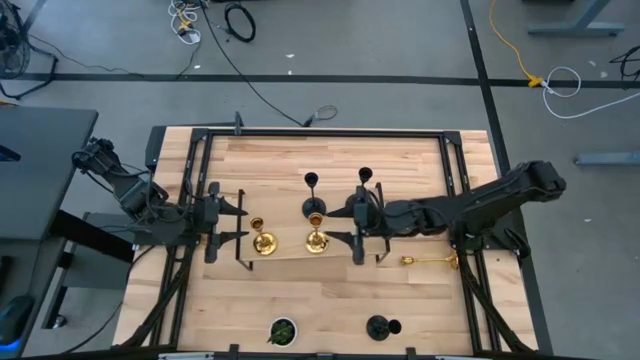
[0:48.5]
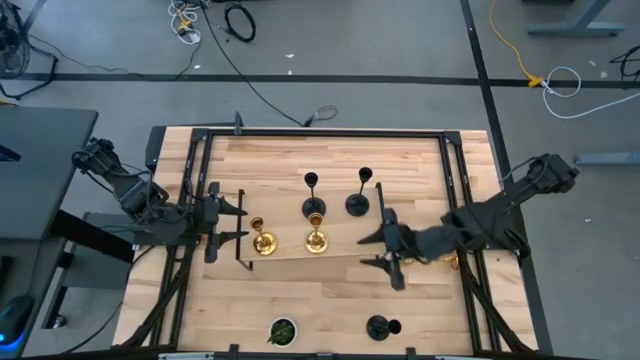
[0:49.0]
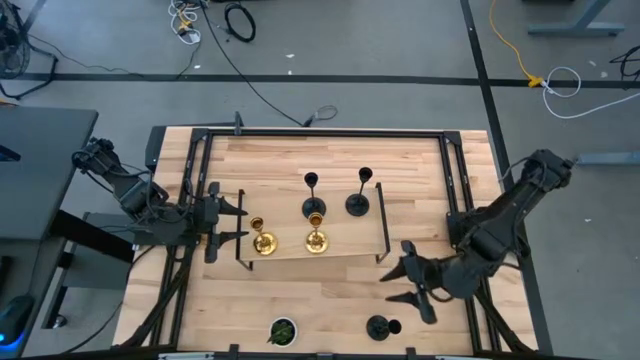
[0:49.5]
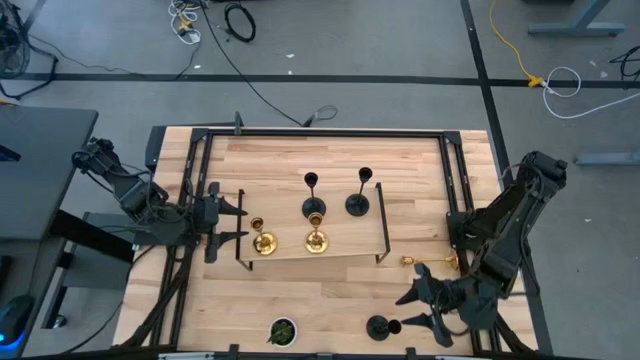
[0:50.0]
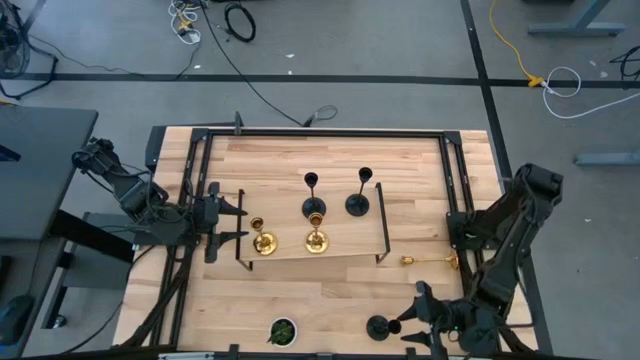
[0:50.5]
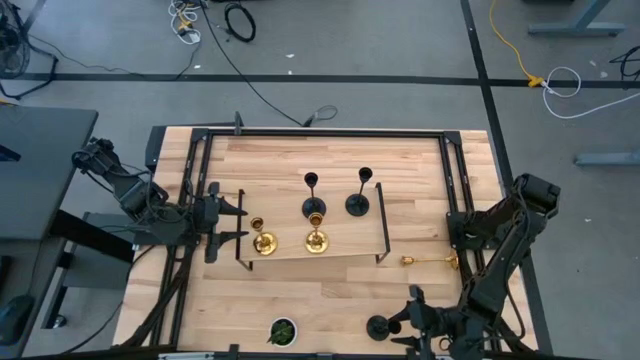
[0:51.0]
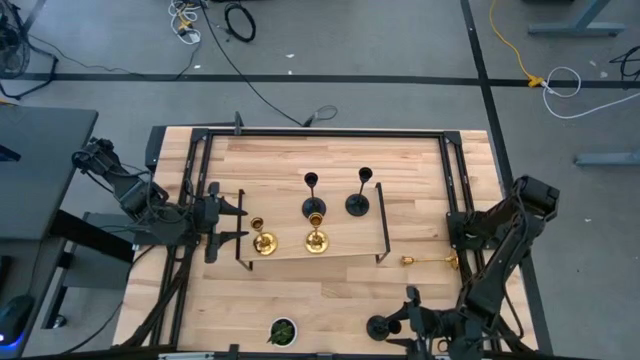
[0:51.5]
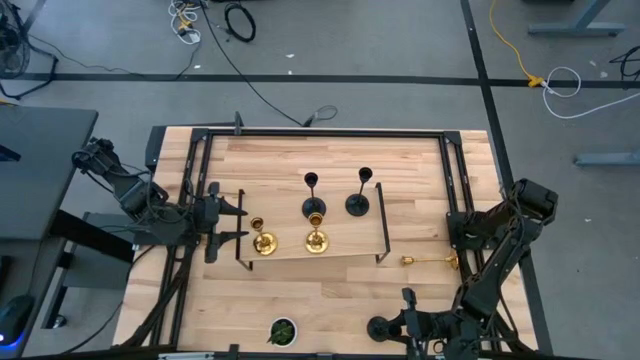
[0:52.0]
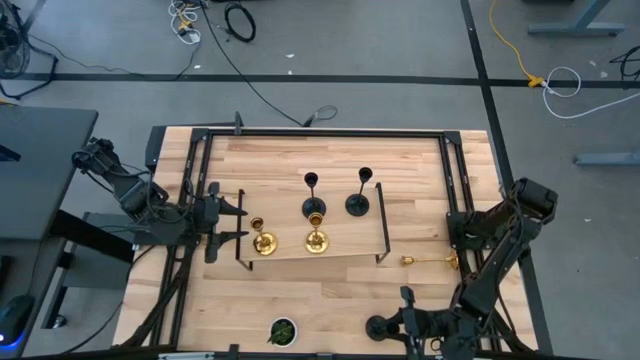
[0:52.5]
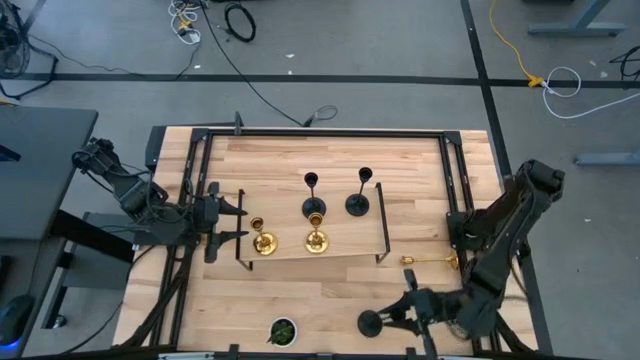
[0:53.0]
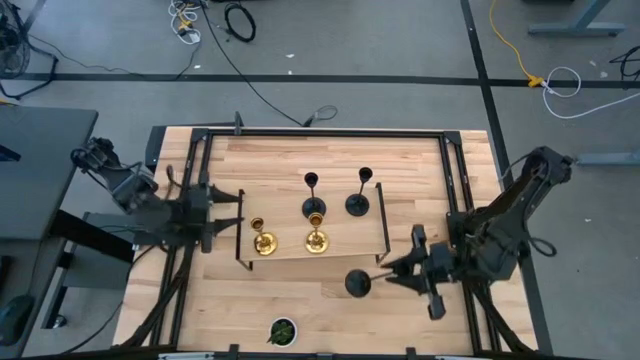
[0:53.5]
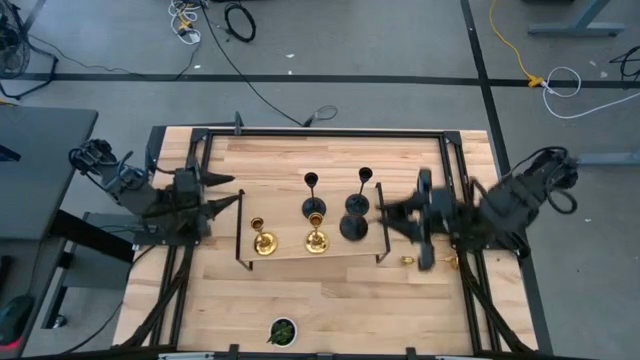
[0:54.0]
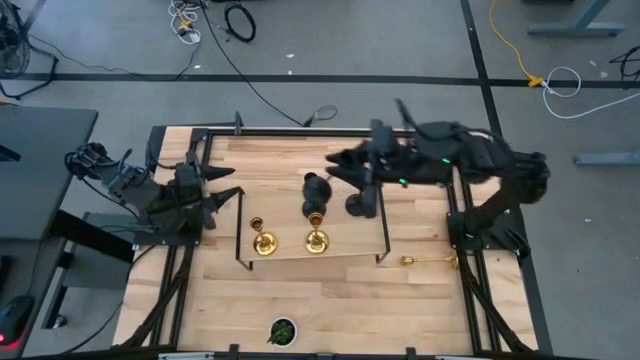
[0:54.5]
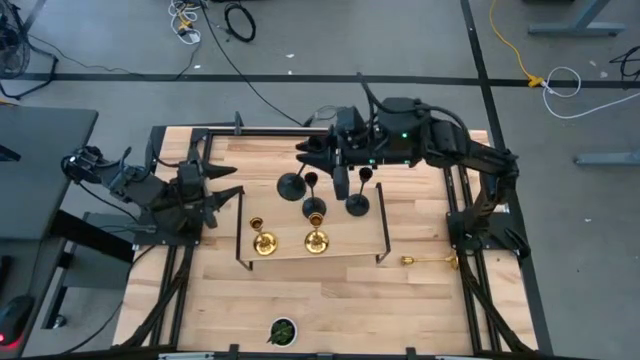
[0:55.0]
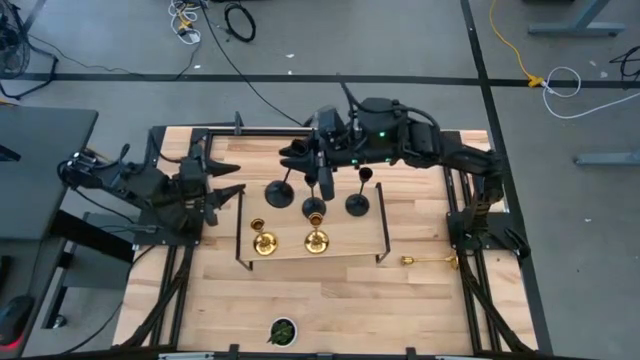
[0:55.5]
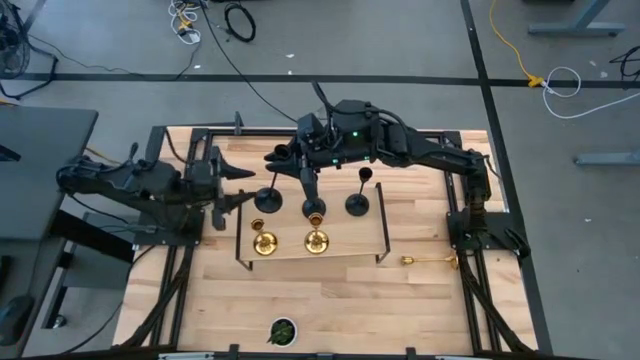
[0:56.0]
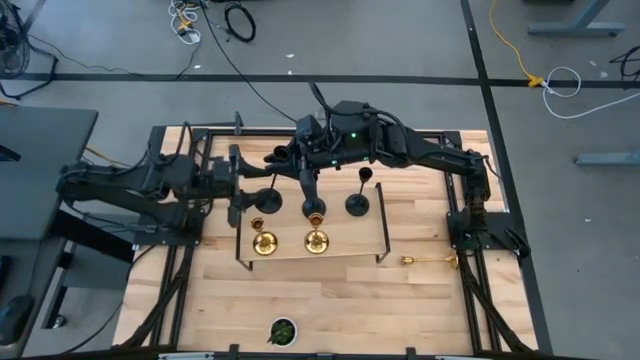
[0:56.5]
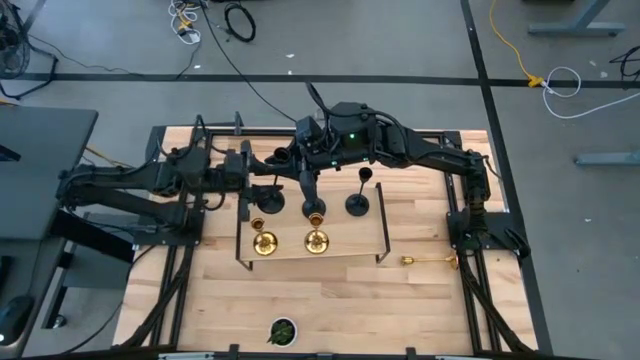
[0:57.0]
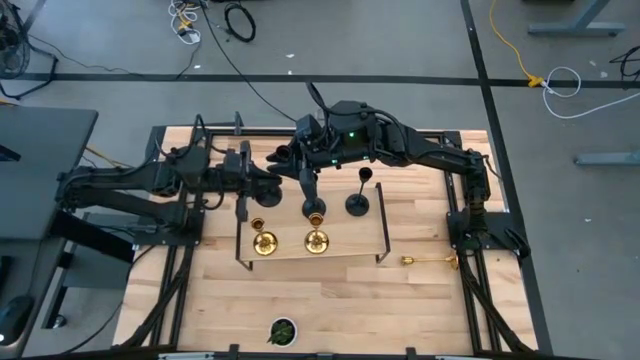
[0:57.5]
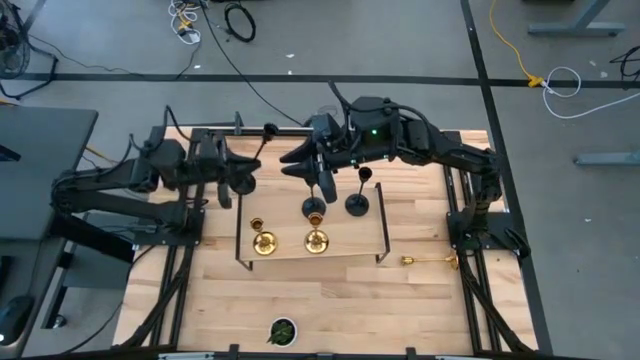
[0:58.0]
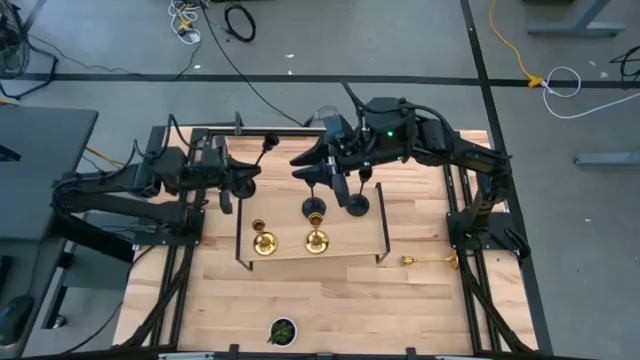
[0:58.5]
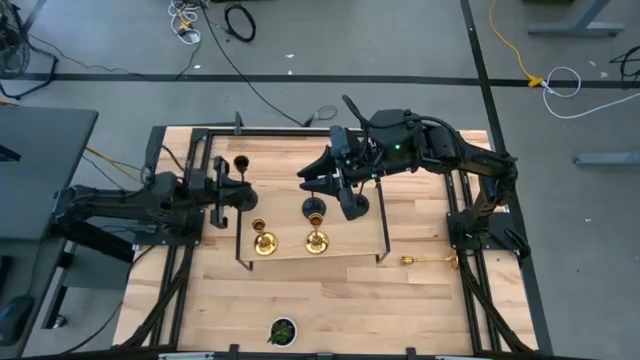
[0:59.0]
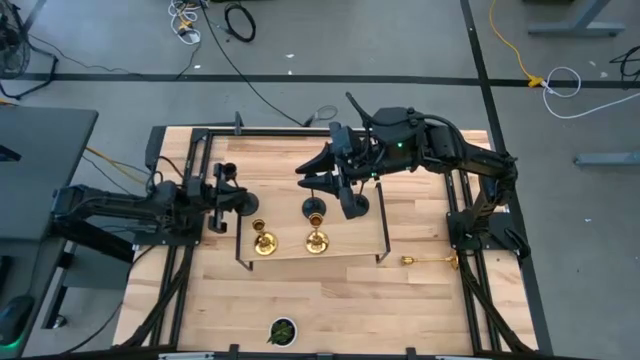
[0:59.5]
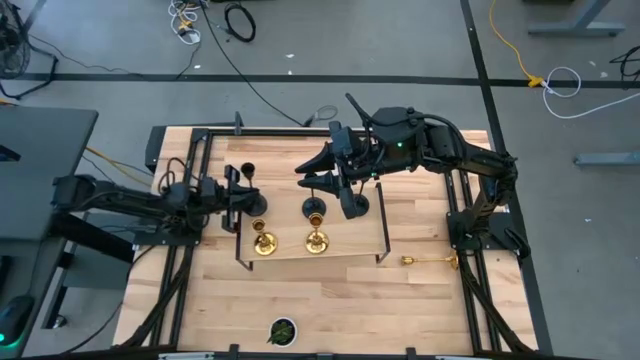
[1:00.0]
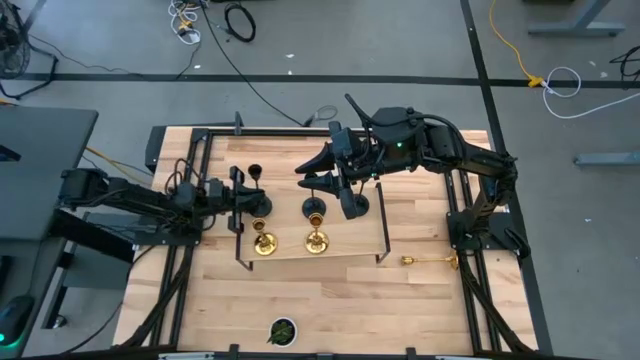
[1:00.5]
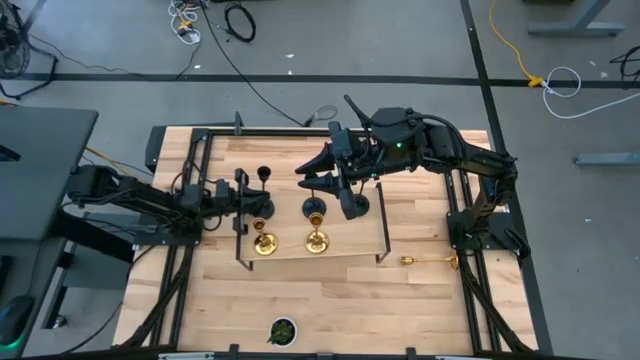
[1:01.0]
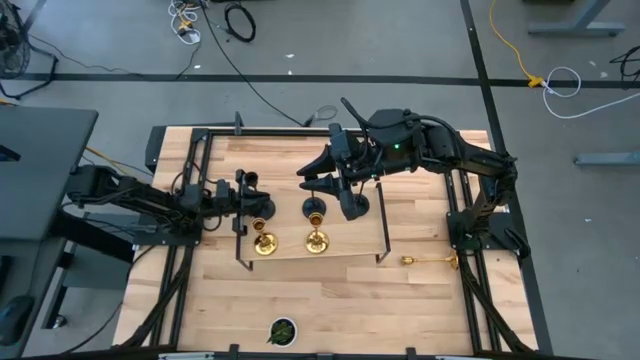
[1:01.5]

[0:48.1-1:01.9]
Task: Pick & Place candle stick holders
Put the black candle holder aligned with the other black candle holders on the shelf
